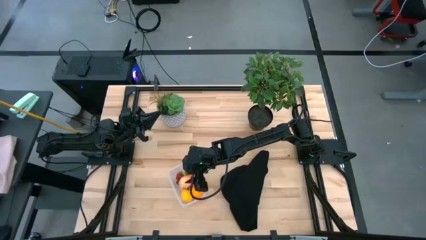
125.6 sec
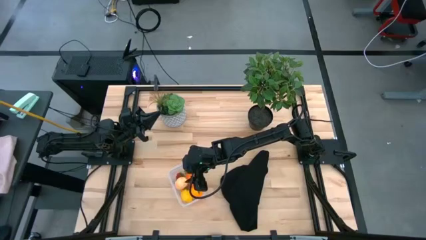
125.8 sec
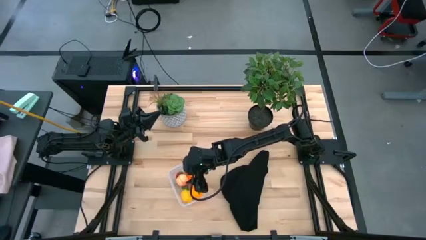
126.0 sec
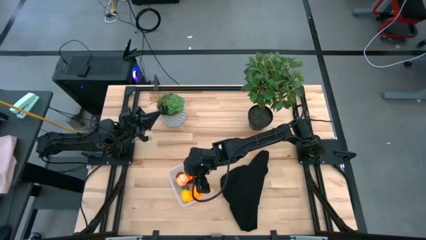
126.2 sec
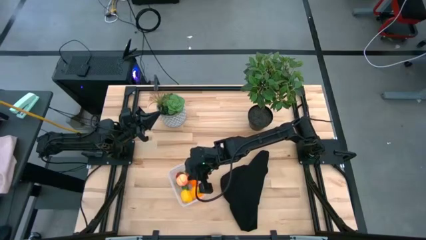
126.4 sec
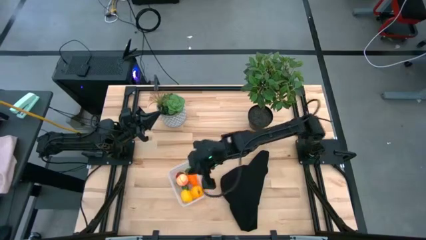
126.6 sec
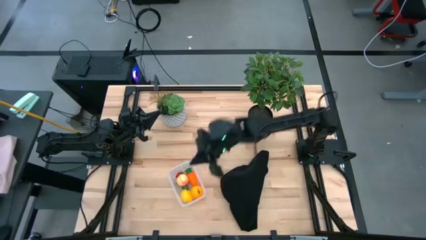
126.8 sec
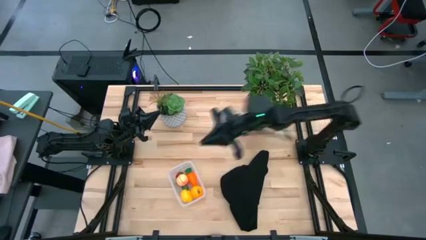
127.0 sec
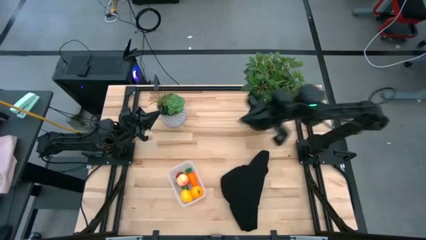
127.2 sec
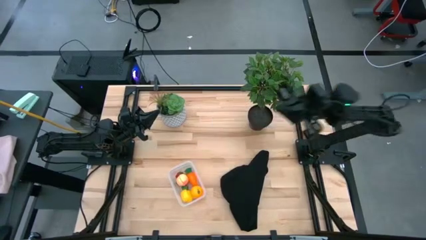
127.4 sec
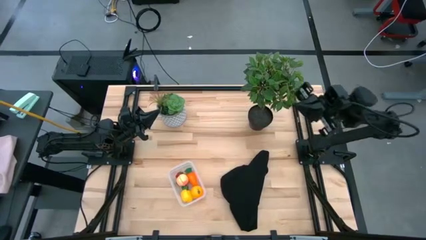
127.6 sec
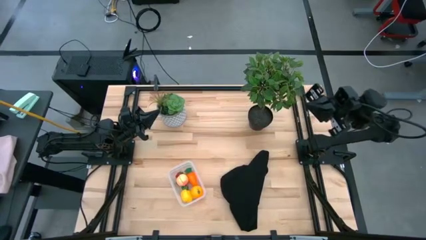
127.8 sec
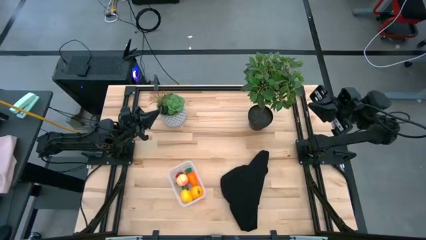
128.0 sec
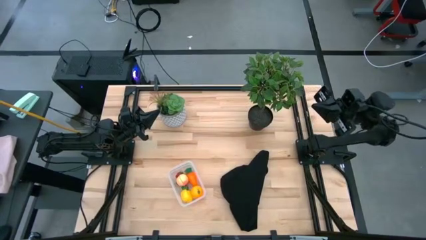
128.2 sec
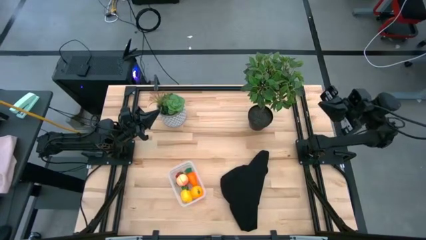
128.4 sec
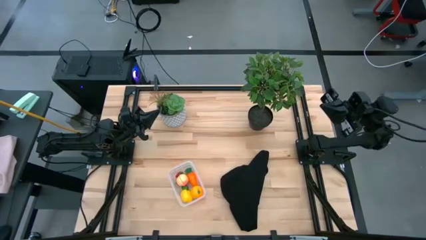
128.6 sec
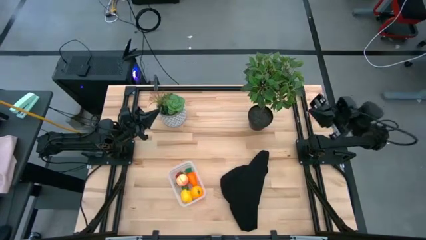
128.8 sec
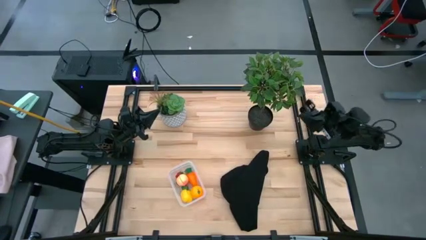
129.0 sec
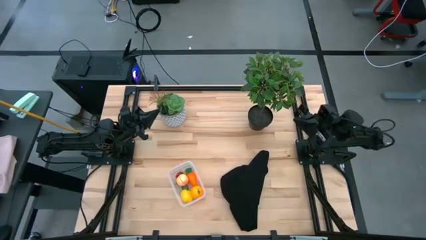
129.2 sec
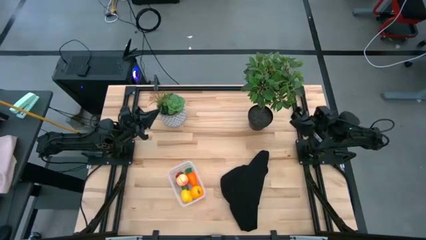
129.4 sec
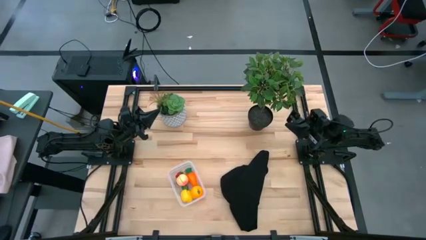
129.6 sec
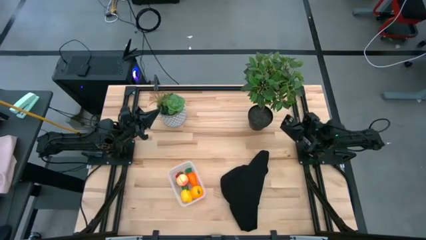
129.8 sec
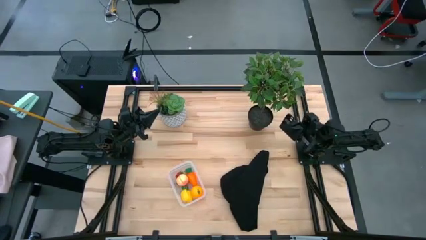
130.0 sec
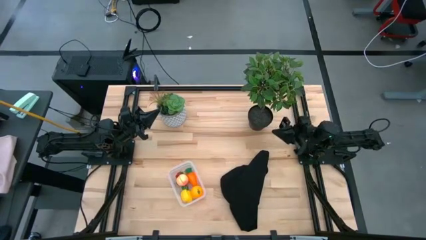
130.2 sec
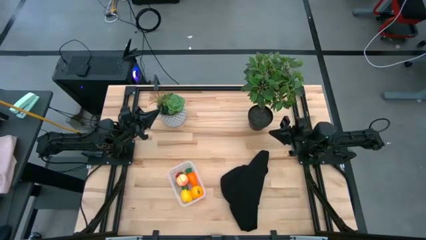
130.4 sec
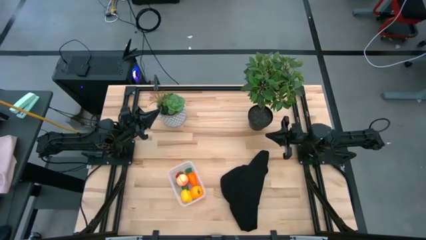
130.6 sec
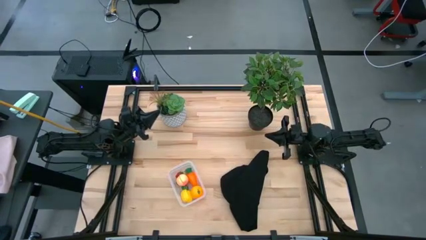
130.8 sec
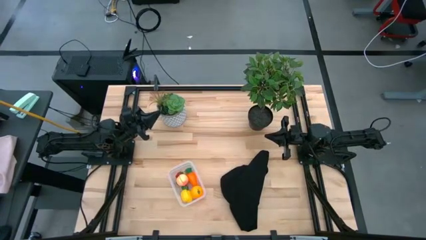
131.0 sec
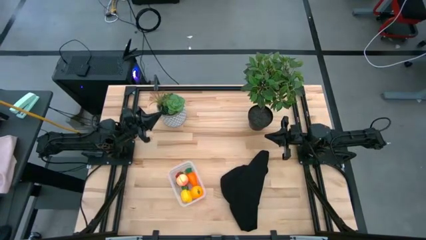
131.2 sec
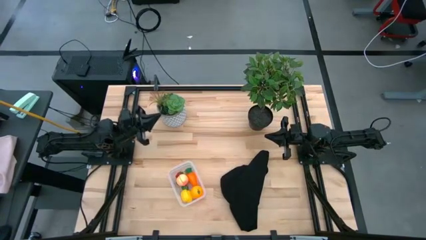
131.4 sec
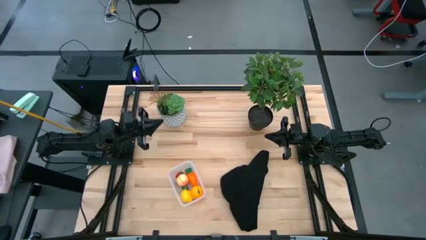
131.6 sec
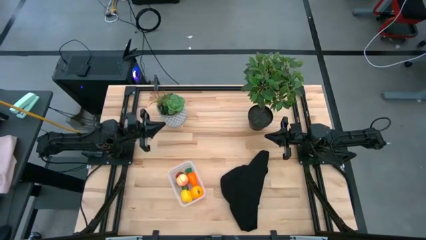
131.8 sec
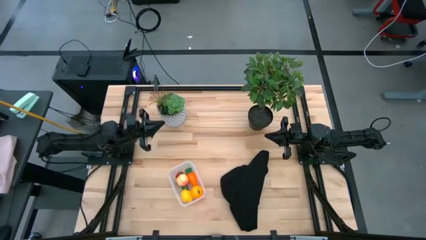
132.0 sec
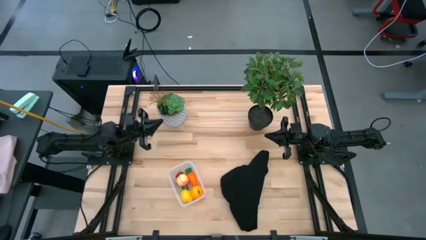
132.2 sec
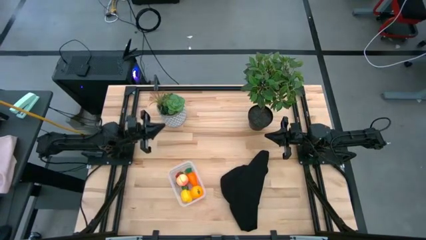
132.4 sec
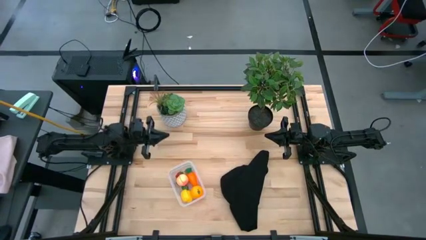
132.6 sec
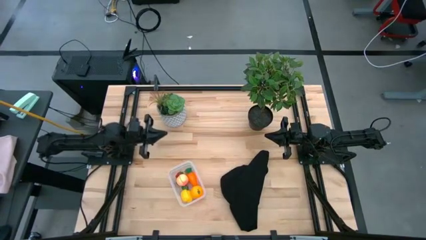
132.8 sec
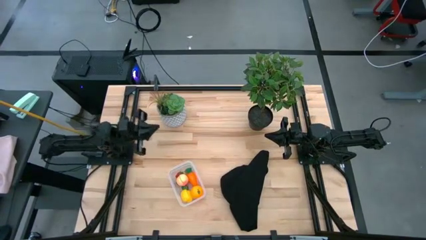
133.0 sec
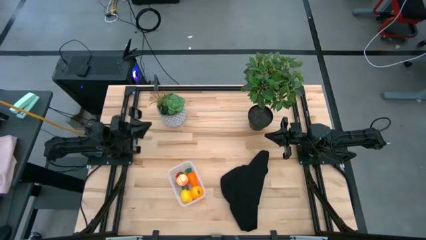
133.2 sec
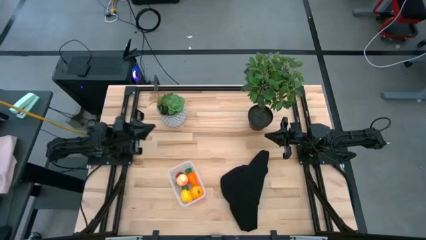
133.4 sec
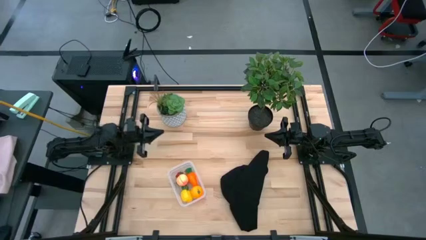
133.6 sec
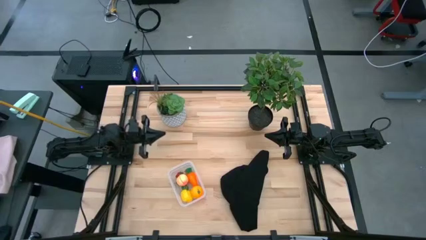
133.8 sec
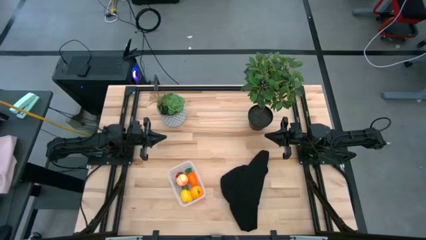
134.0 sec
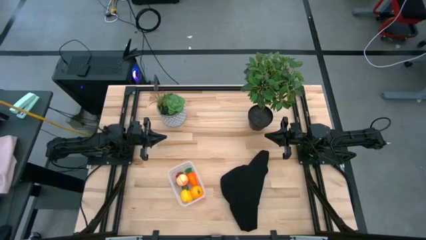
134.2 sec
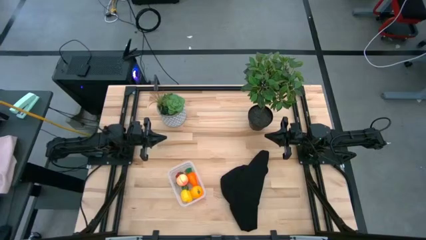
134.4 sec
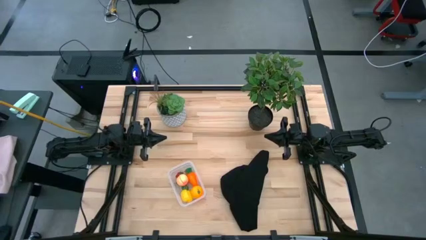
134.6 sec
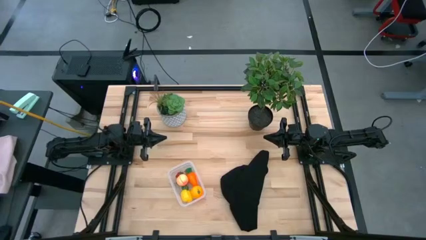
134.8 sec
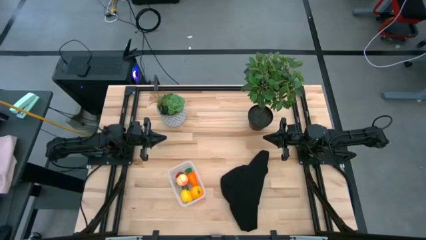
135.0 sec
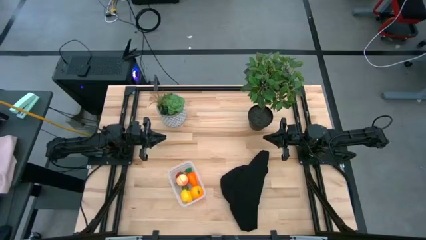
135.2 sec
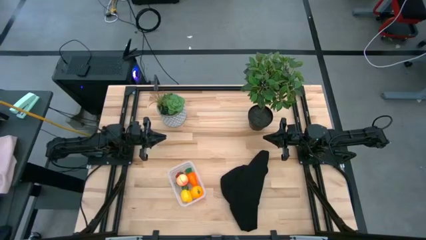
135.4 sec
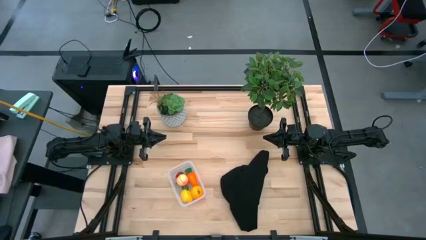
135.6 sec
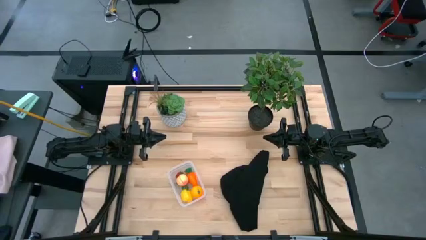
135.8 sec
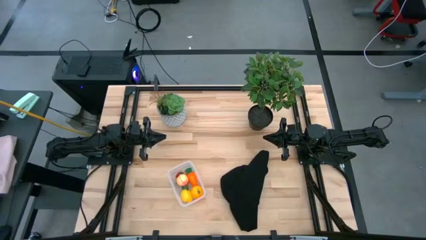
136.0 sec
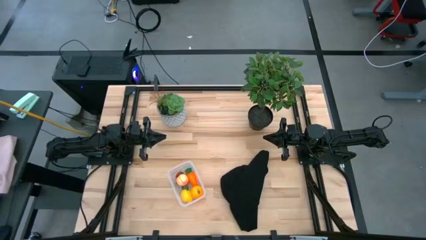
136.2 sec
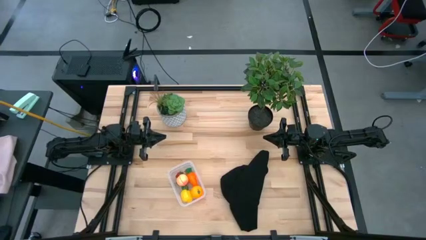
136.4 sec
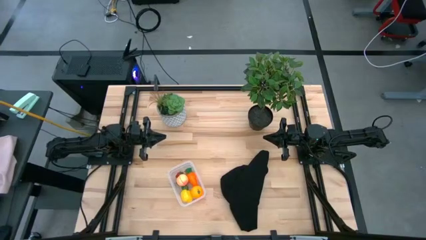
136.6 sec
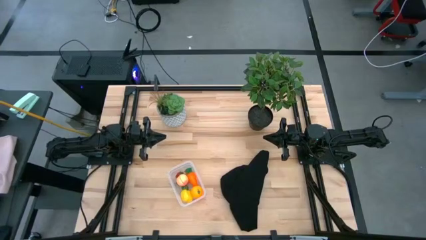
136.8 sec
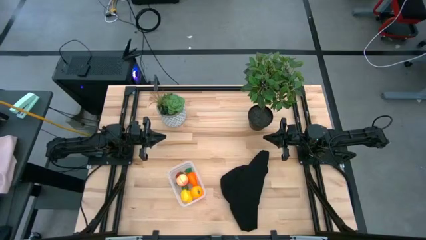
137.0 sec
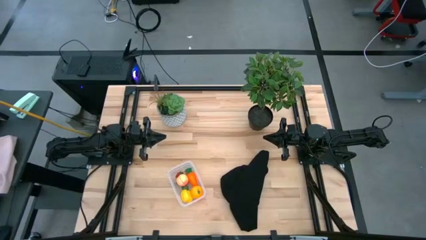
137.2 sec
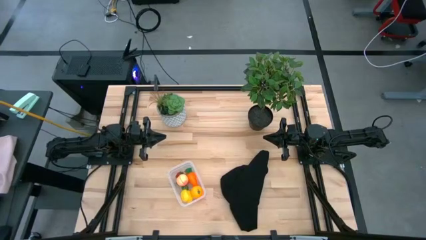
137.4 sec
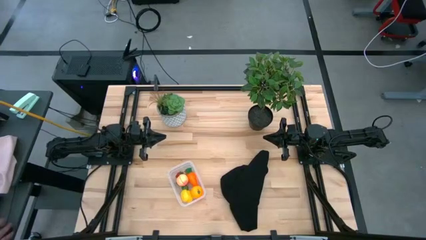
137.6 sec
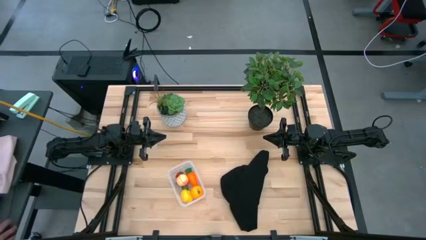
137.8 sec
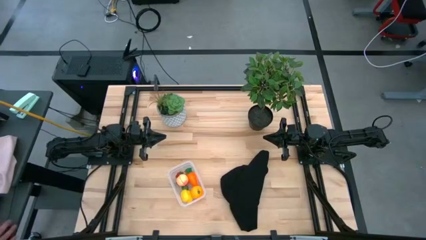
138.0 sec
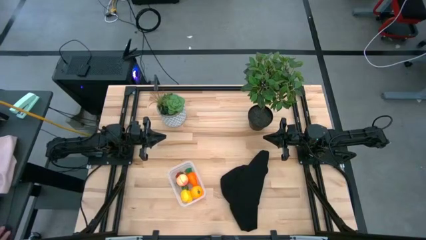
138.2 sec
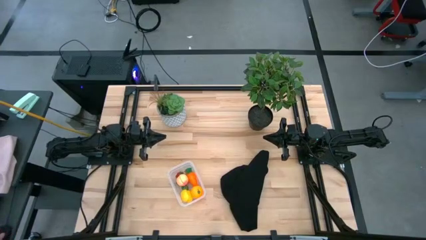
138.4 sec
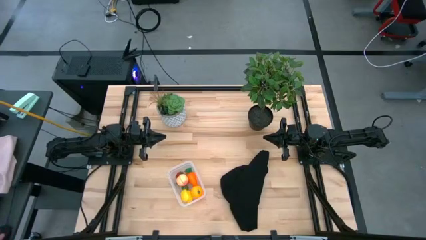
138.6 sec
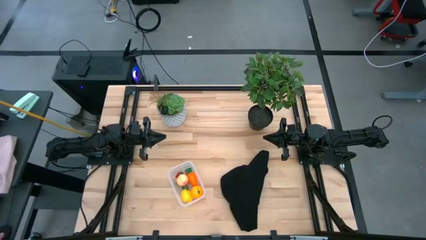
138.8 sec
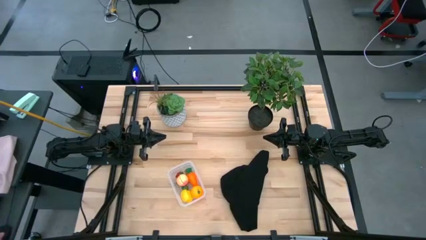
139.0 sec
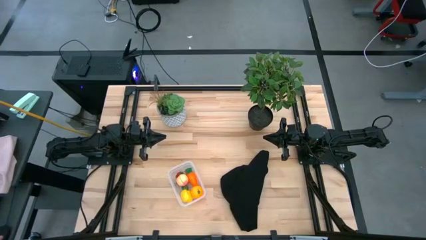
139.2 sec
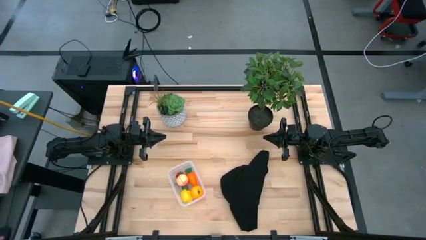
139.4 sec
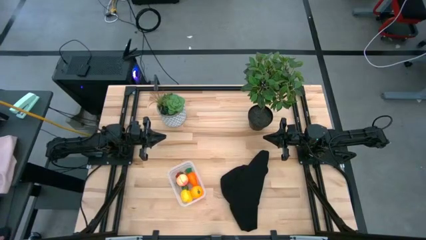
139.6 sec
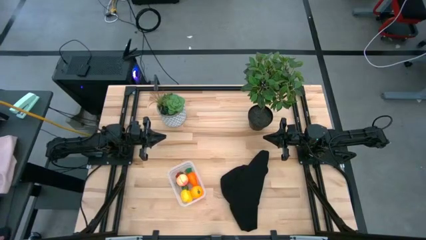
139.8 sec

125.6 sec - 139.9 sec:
Task: Pick and placing Produce into tupperware
Return to home position

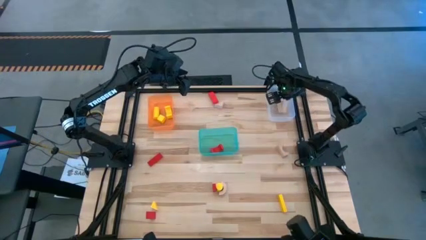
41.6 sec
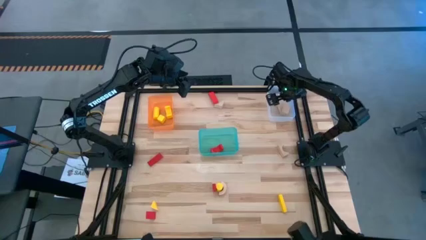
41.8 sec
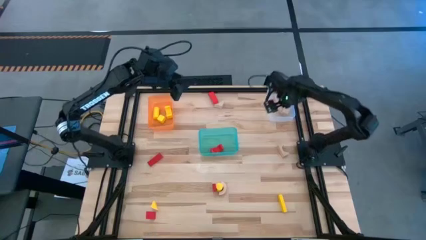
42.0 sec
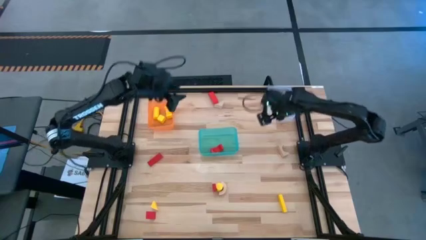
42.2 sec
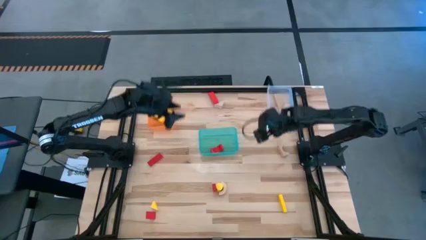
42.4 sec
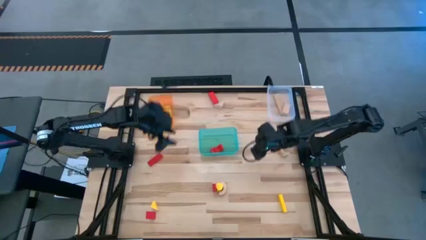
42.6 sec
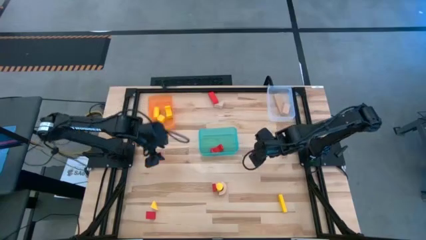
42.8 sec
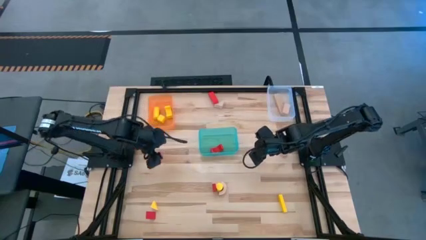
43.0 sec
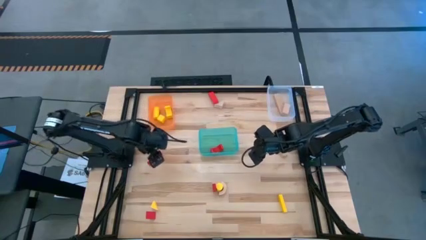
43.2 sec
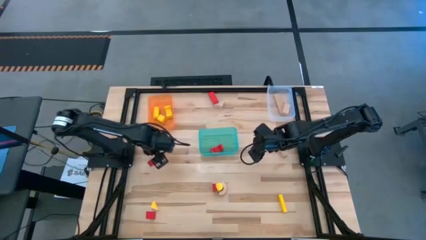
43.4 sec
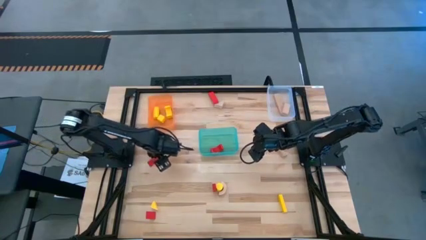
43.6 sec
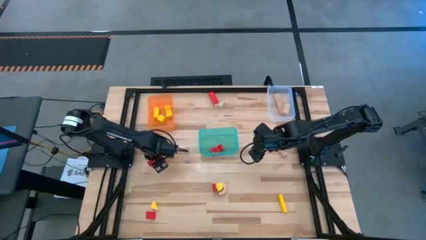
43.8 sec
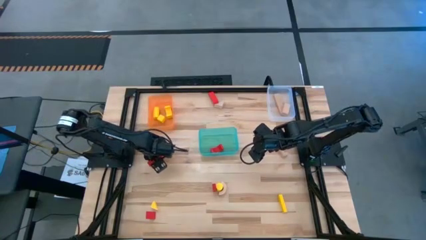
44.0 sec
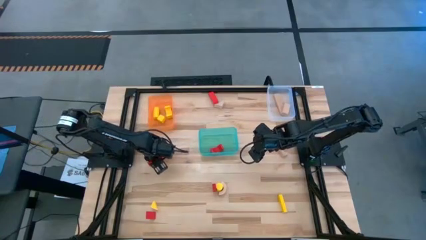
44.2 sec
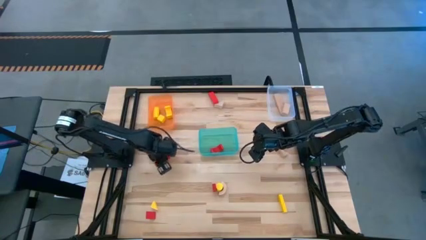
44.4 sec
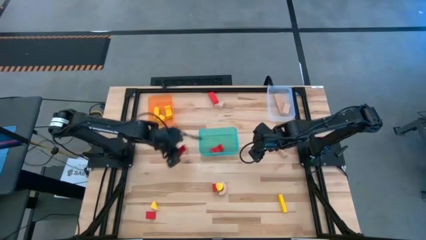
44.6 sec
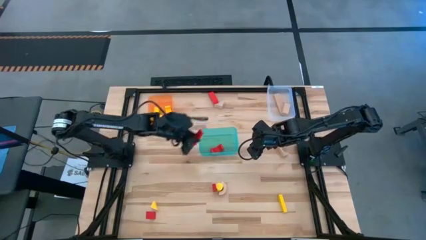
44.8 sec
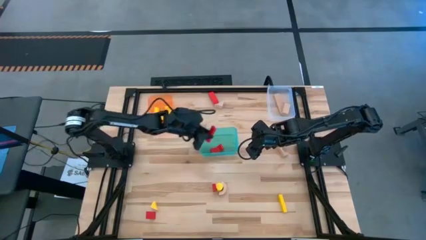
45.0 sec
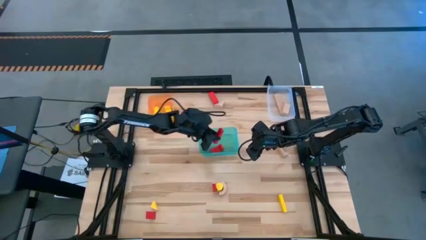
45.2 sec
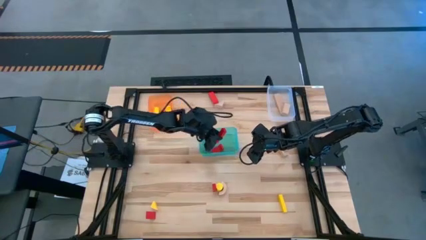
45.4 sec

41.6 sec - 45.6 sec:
Task: Sort & place blocks by color
Put the red block into the blue bin
